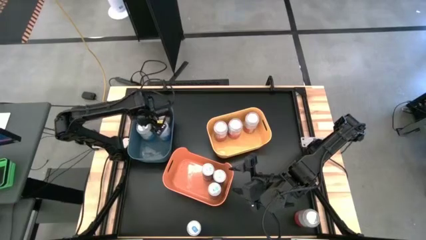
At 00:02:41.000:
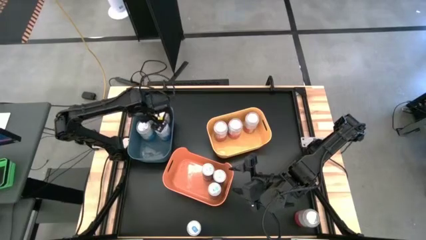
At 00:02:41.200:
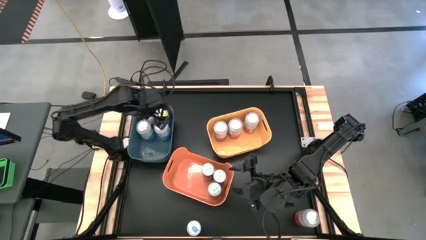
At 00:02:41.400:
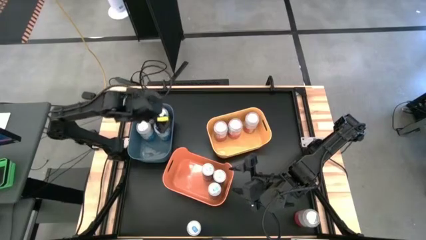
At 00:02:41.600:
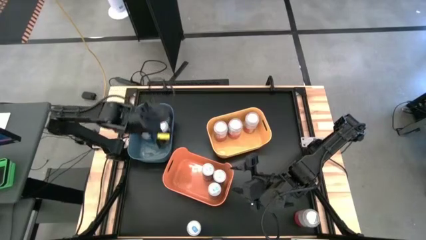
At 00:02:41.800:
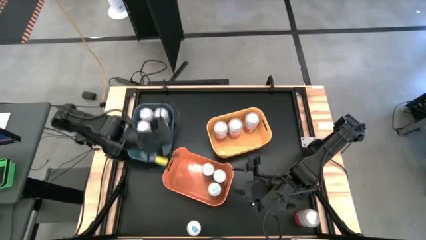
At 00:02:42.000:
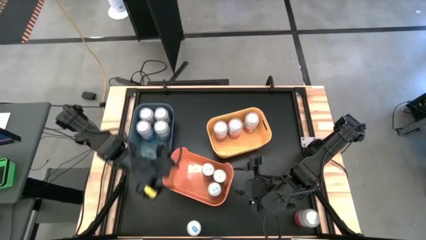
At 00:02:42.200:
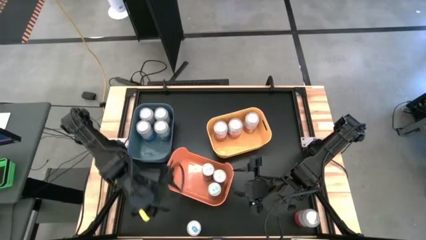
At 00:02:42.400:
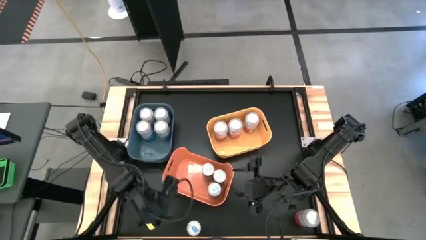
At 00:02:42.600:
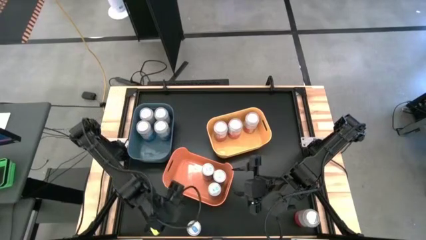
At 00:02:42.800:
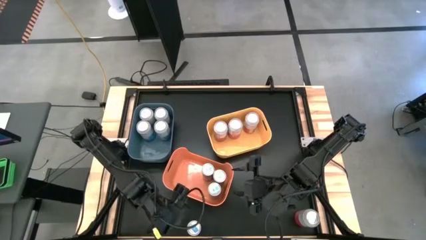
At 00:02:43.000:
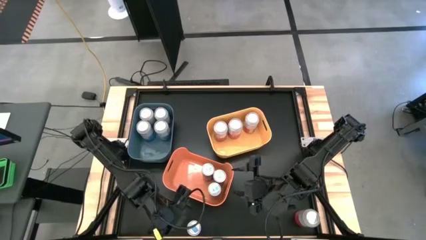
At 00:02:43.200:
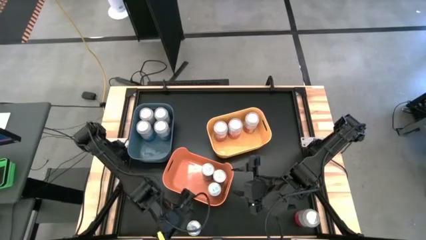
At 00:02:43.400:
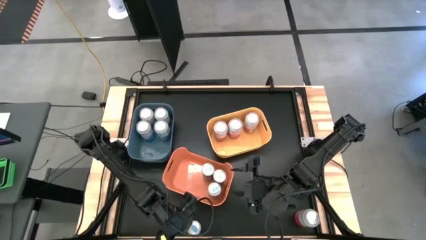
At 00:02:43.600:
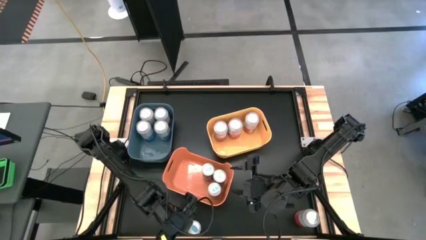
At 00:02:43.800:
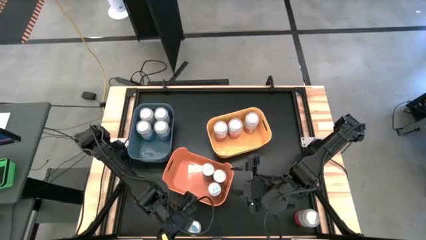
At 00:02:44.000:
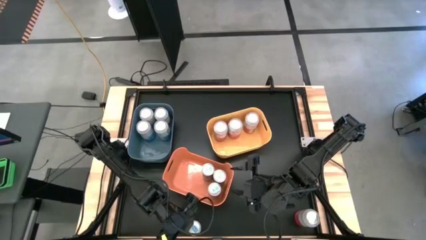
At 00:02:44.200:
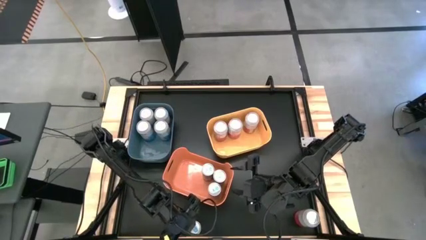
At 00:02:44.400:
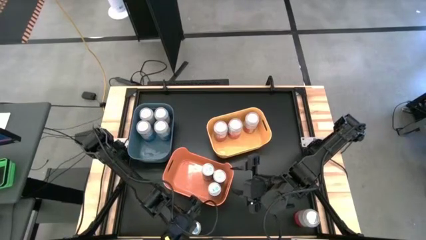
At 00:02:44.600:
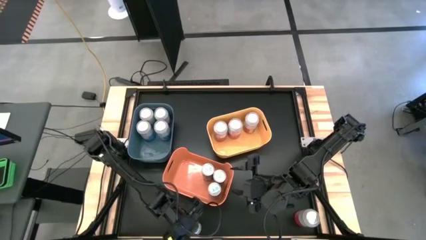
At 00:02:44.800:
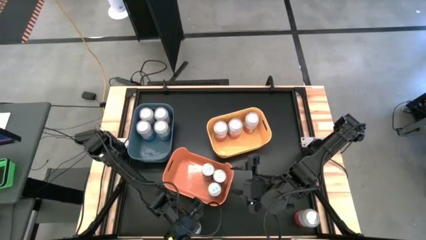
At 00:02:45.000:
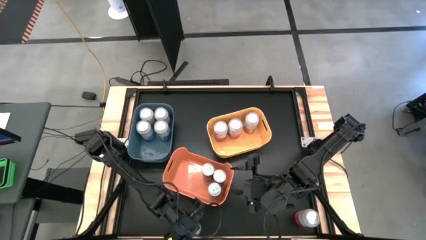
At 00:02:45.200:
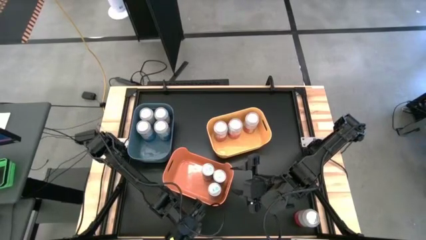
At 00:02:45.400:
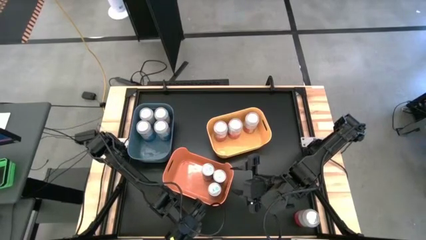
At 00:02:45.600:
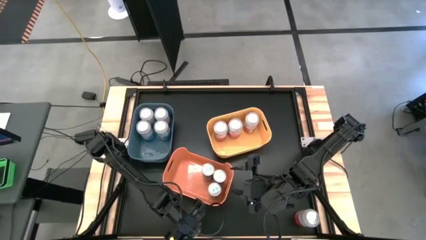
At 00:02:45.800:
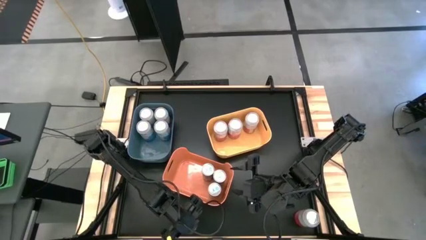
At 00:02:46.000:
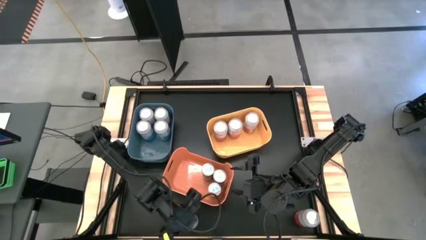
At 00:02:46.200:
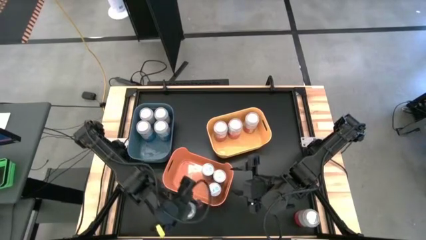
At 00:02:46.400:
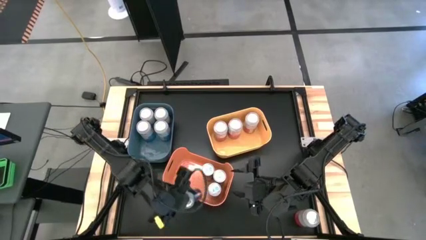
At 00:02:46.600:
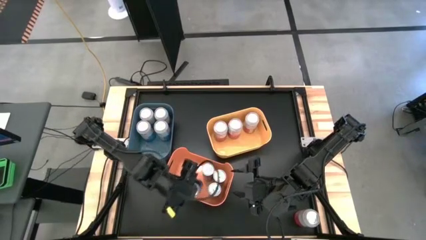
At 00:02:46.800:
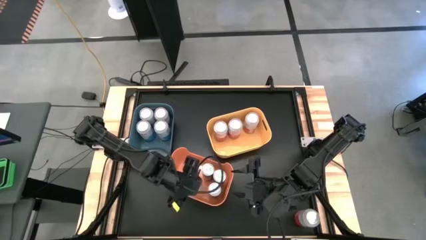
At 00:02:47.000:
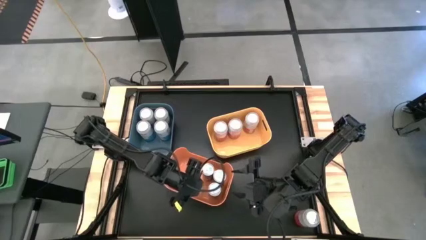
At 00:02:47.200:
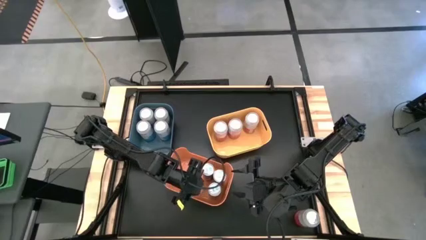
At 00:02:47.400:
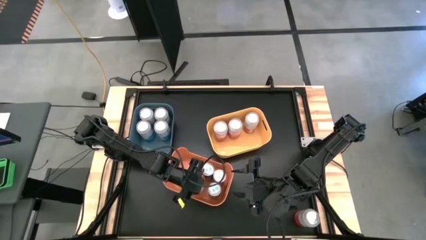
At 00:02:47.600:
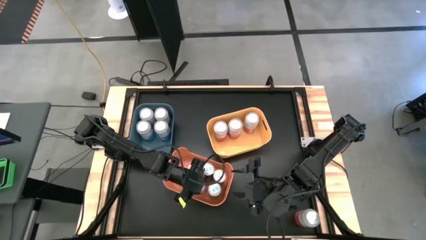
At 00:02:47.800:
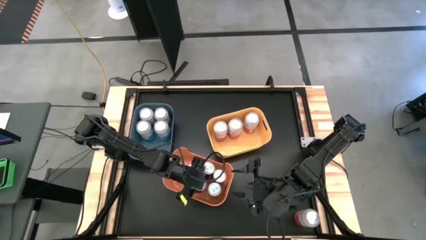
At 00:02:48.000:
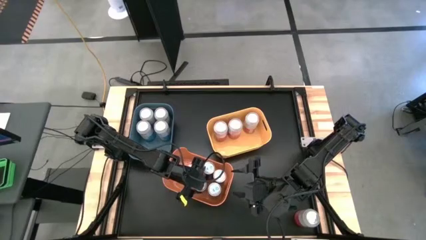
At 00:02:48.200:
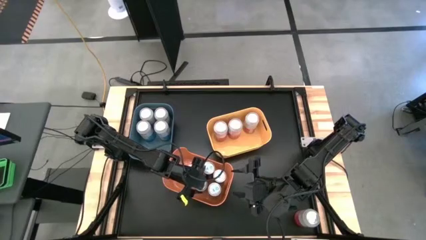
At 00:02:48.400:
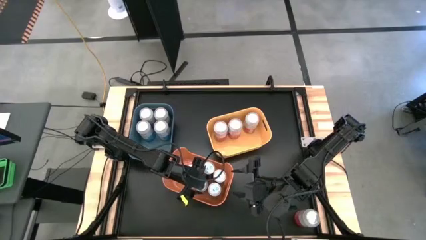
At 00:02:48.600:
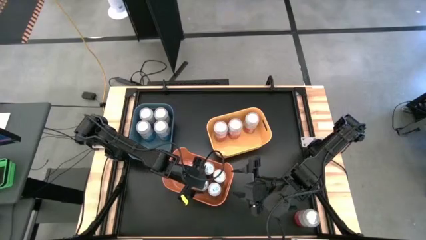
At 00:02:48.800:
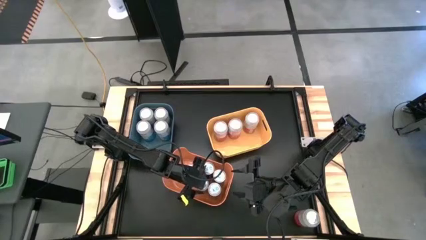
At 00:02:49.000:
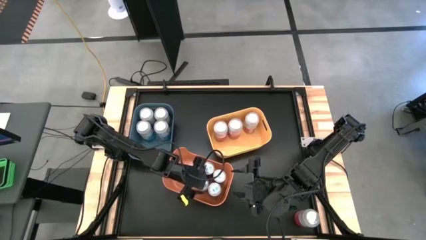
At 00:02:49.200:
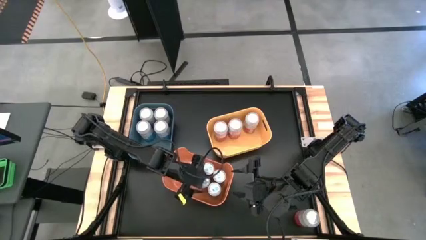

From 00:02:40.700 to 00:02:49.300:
Task: Sort soda cans
Put the blue soda can into the orange bin

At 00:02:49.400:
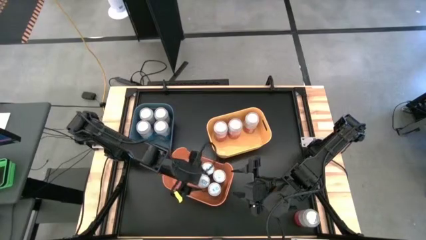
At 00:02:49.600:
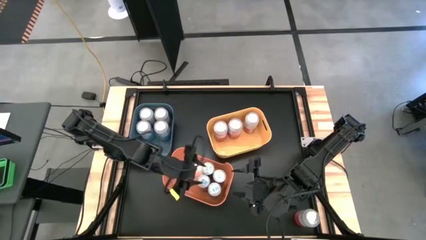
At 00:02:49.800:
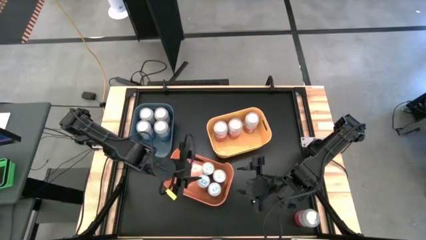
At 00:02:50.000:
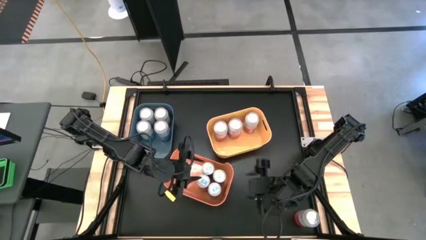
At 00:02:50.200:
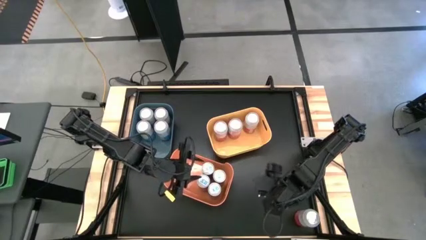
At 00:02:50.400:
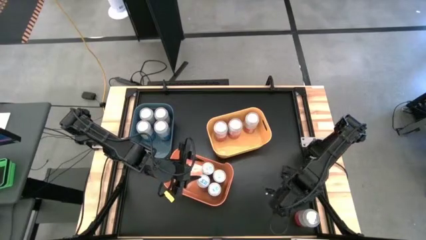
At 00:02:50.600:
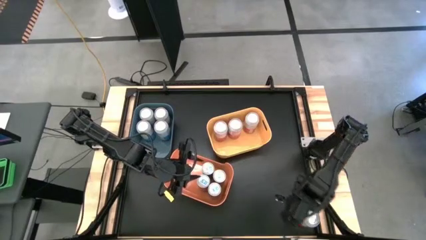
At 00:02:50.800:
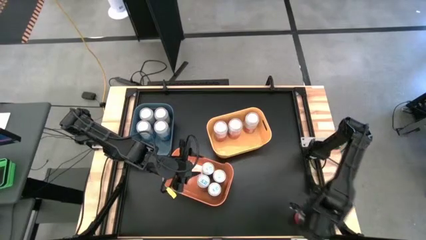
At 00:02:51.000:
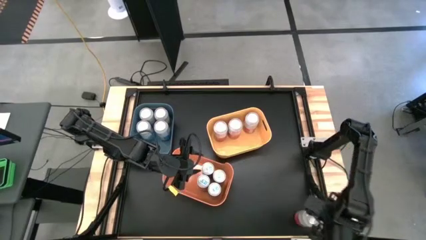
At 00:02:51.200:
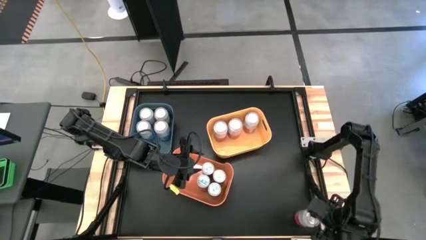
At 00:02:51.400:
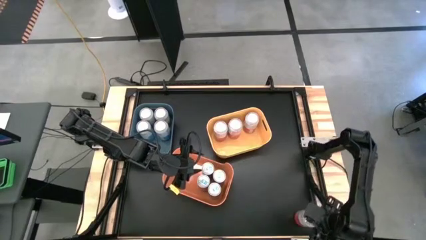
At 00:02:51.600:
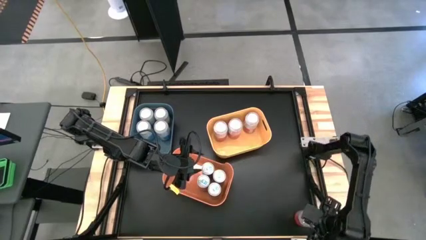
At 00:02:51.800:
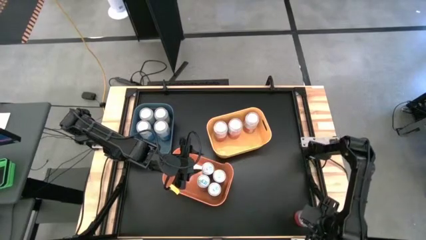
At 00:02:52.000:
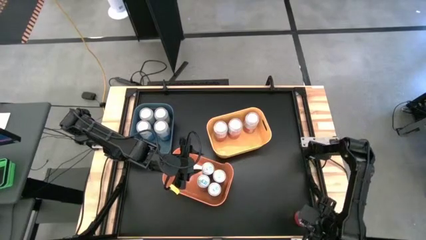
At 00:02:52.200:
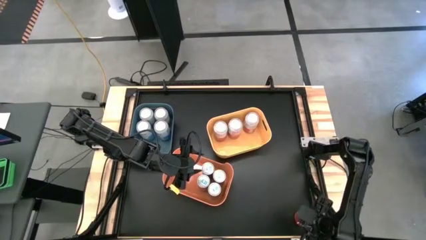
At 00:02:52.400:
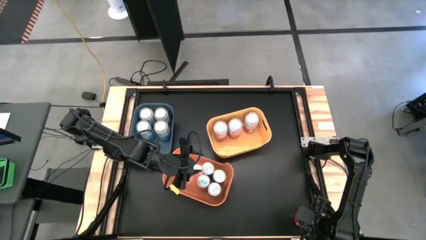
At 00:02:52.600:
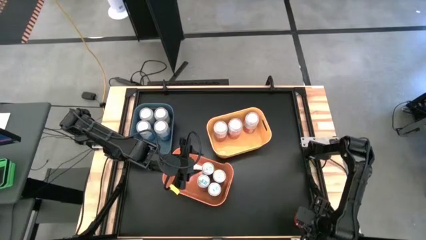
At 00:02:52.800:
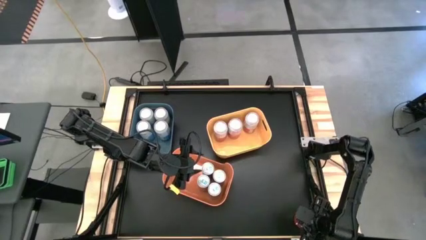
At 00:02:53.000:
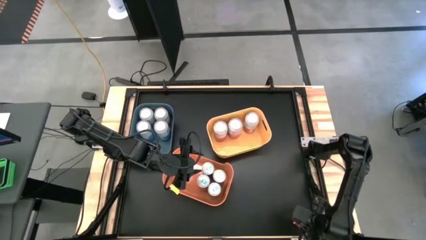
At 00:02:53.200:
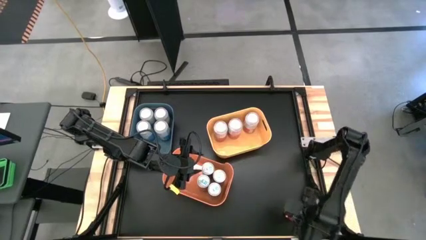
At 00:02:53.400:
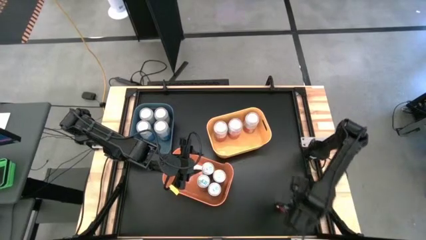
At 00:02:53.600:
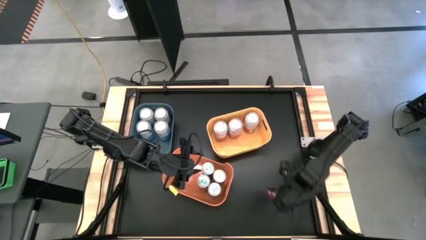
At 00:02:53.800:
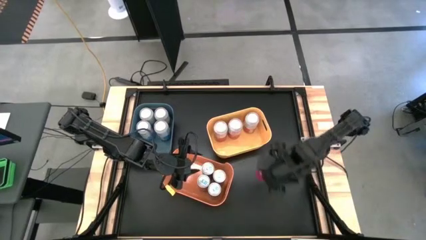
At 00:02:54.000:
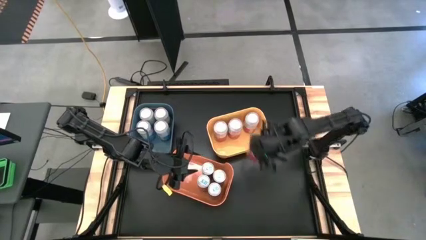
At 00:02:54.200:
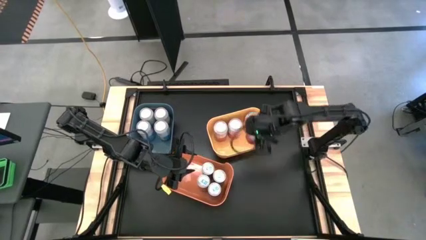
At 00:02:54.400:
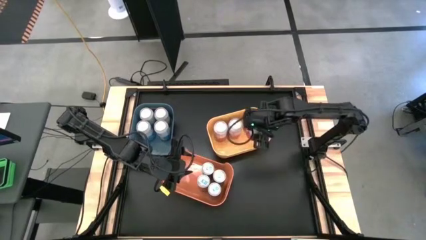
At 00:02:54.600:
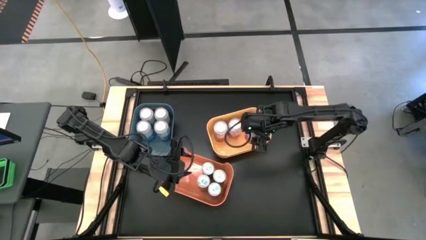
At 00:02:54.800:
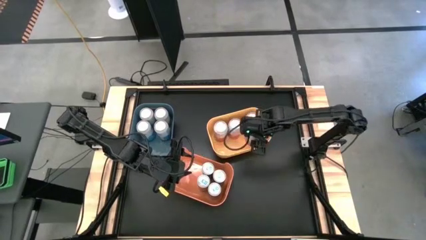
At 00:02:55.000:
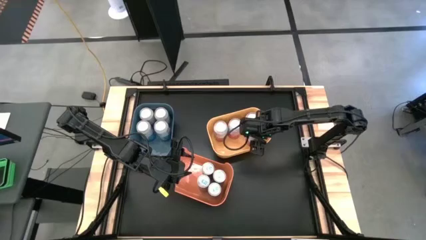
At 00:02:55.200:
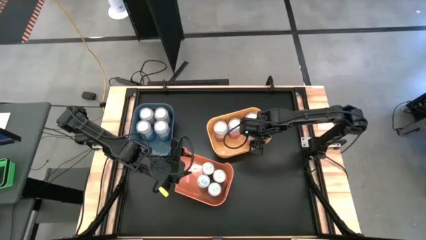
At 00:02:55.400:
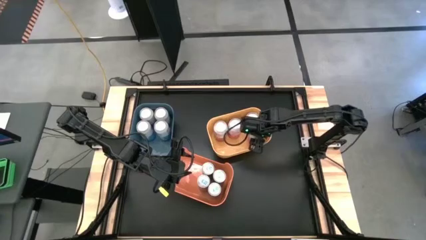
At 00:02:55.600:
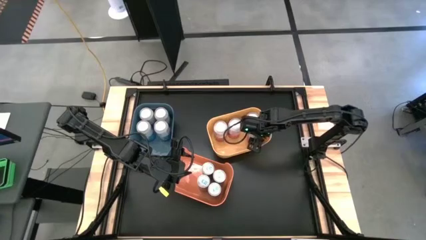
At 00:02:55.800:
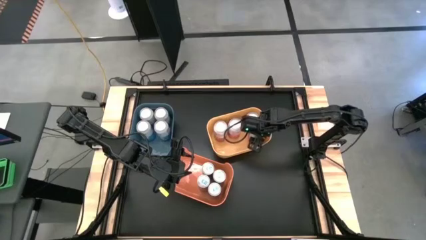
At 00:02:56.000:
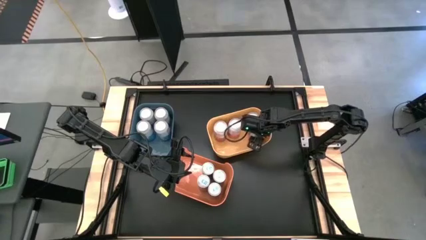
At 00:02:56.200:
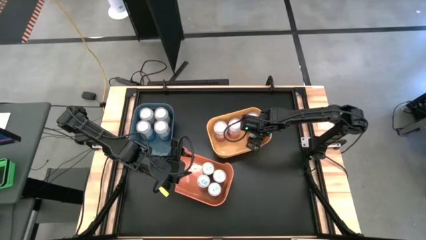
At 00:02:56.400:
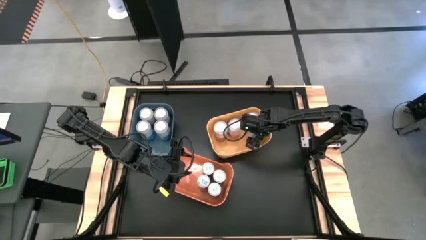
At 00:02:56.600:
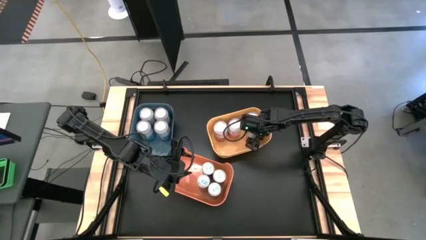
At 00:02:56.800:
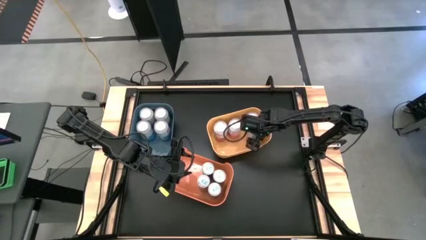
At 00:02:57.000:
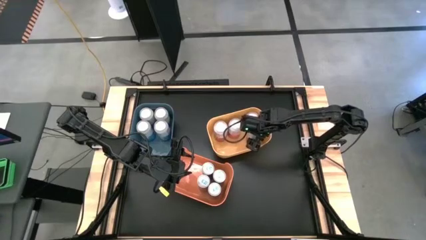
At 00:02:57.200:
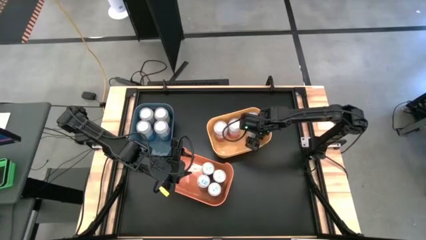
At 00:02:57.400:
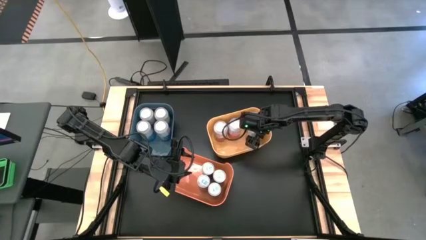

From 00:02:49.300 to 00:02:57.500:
Put the pink soda can into the yellow bin
